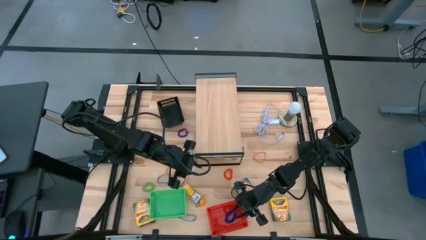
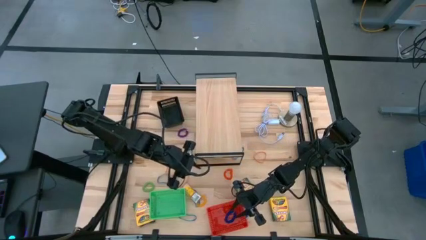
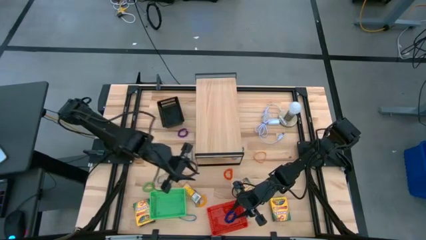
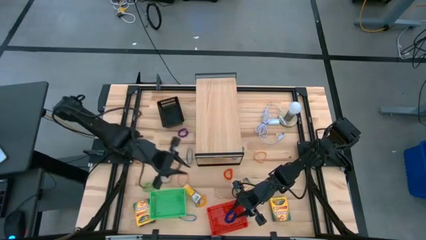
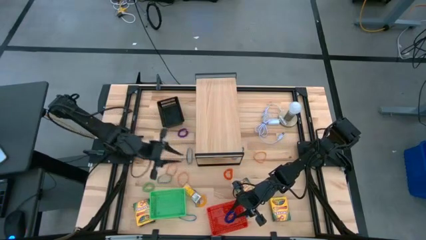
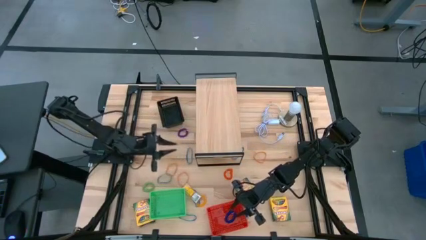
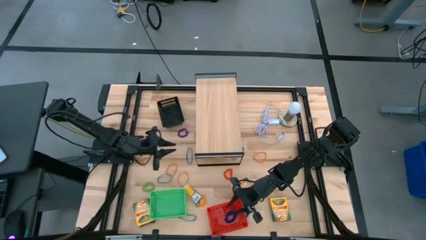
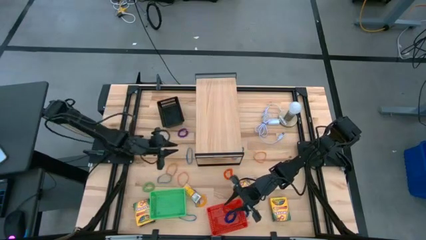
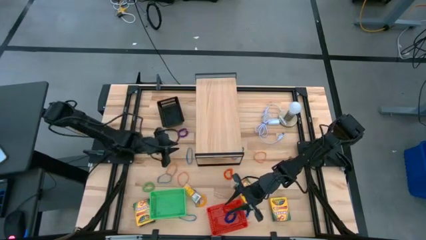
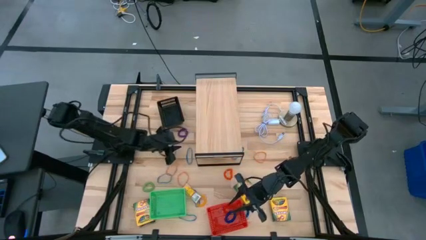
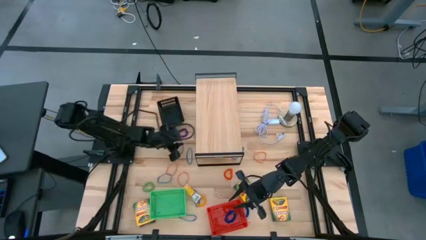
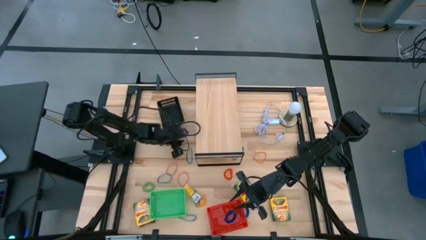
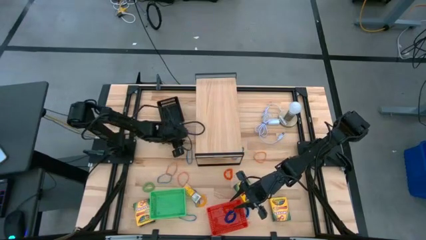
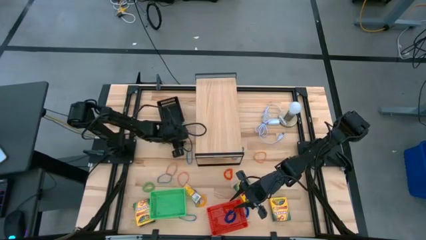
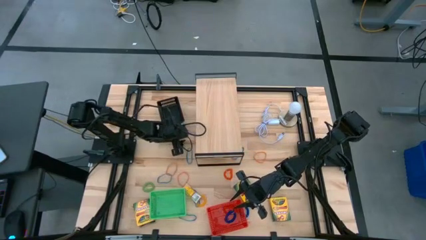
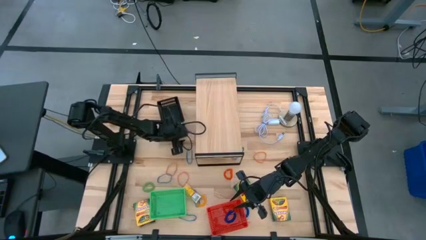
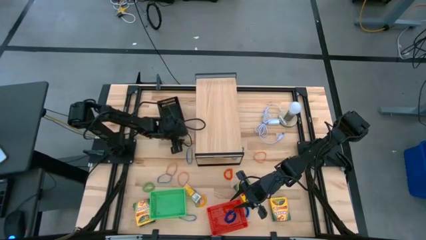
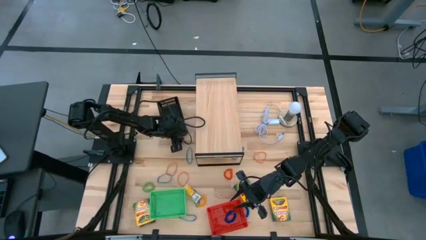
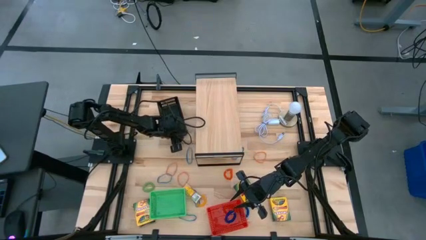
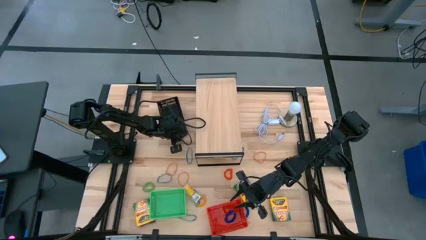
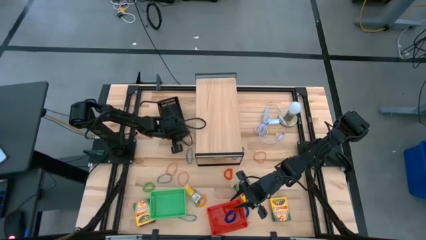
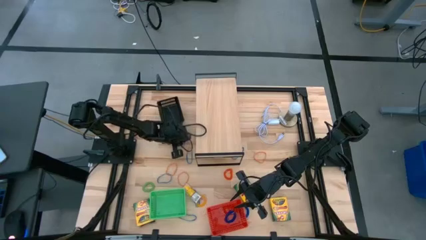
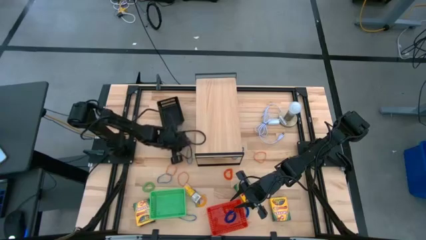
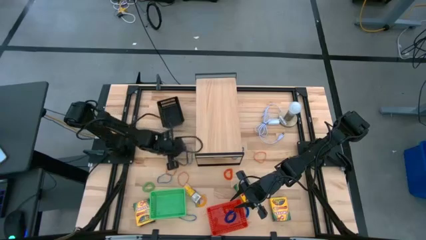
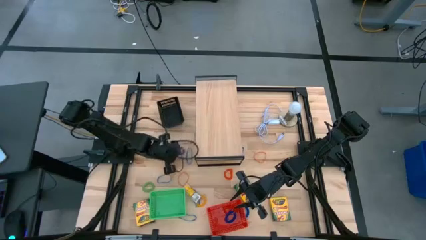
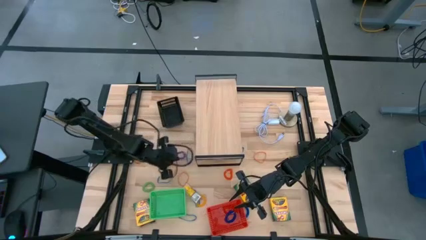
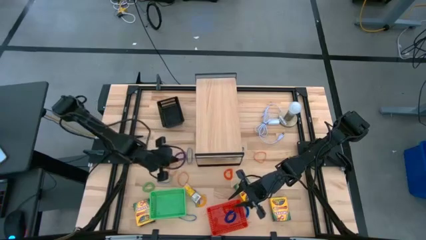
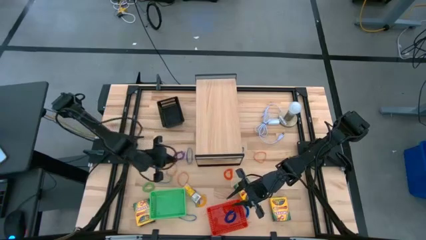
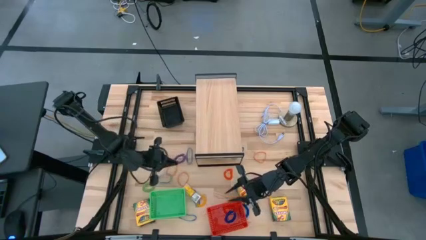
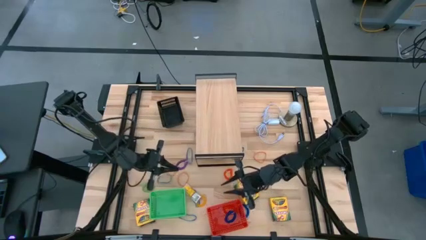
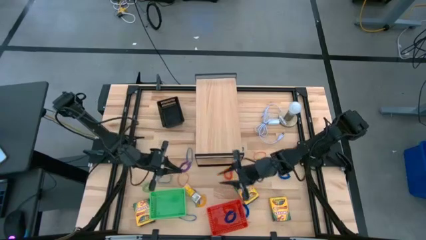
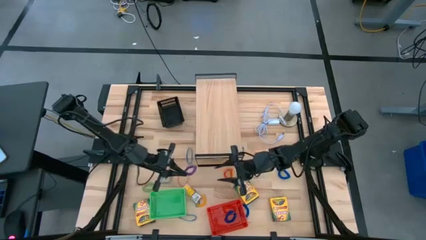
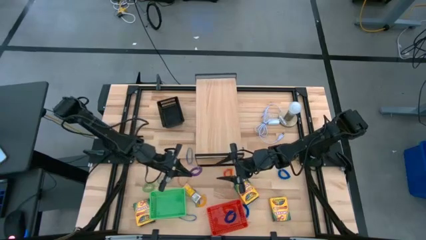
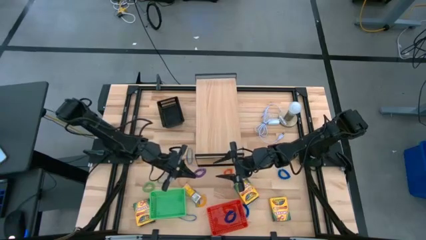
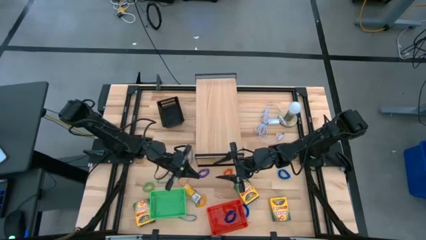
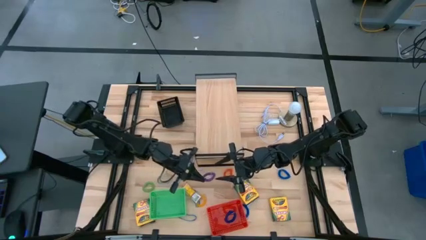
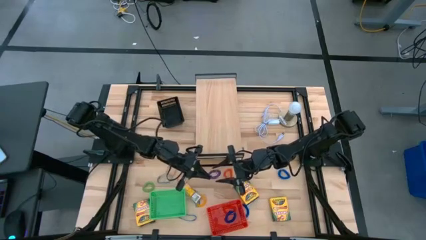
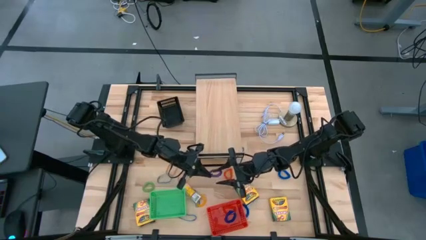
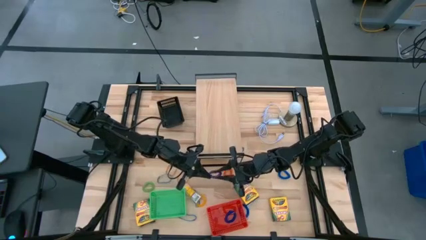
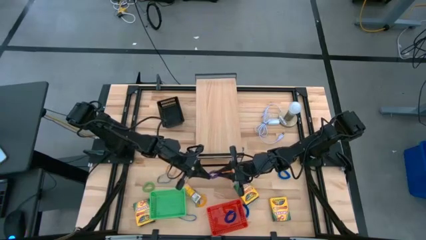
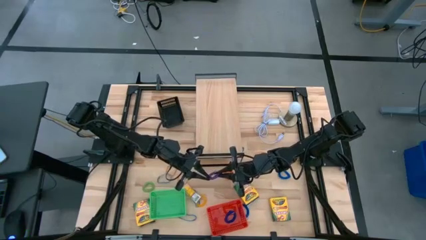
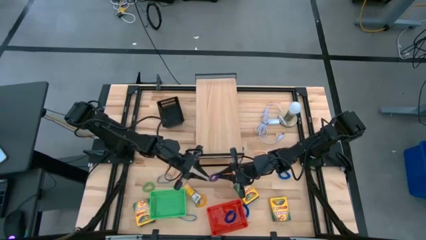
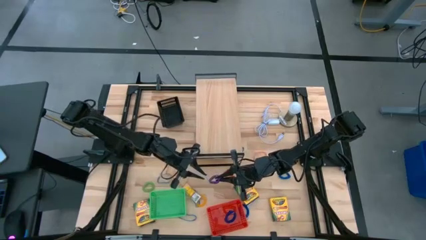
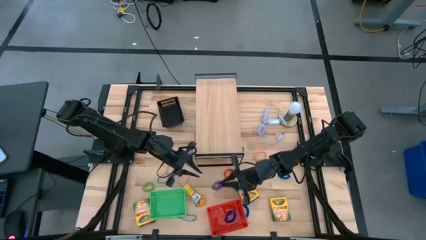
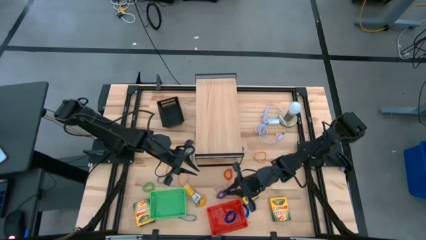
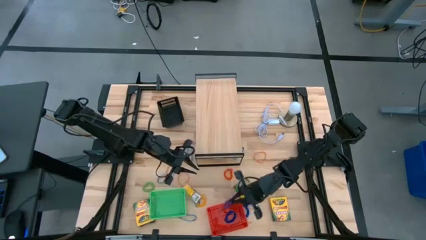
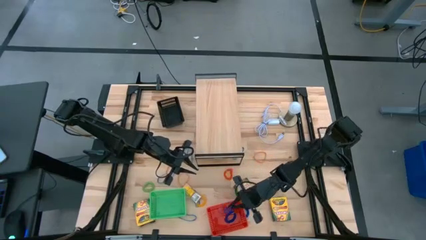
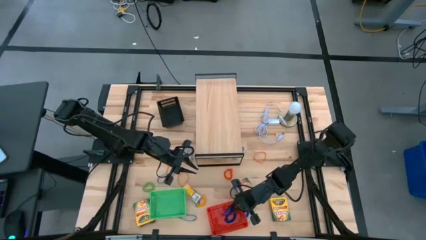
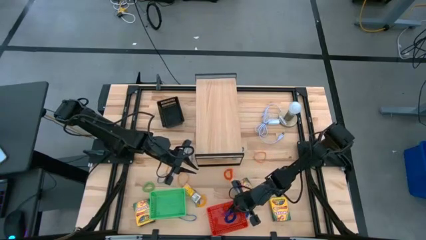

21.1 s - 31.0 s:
Task: Pick & Place Office Desk Supplies
Put the violet spring keychain into the red basket

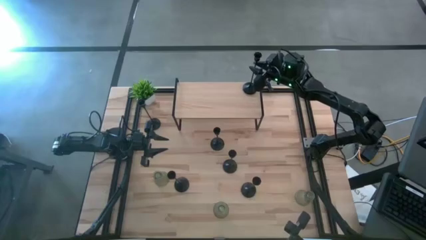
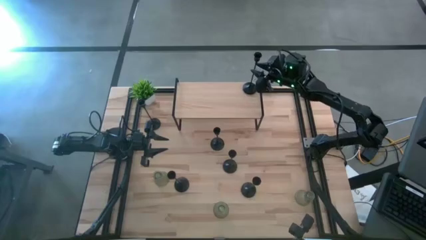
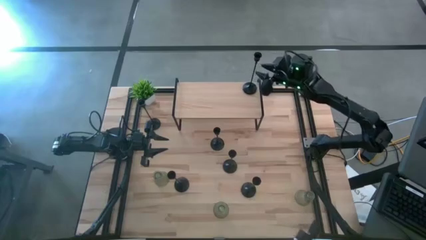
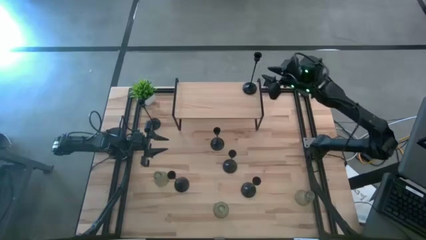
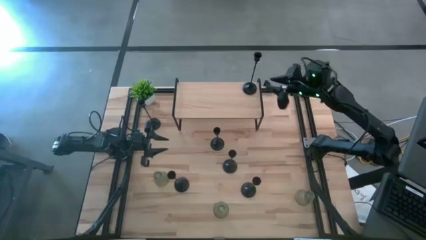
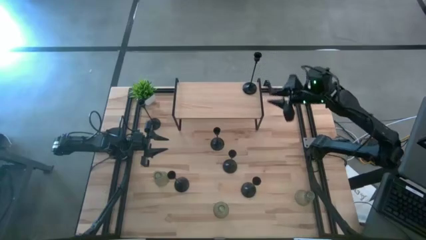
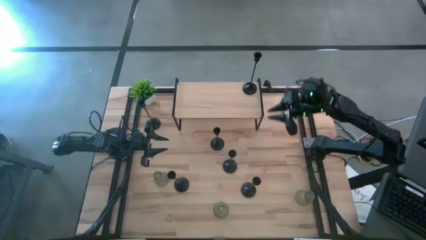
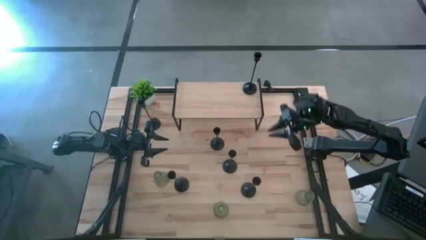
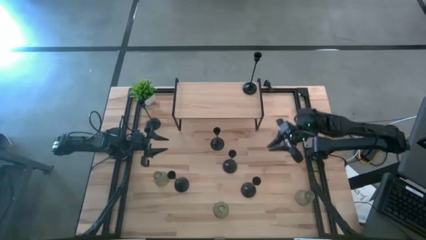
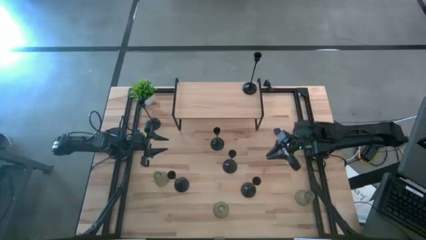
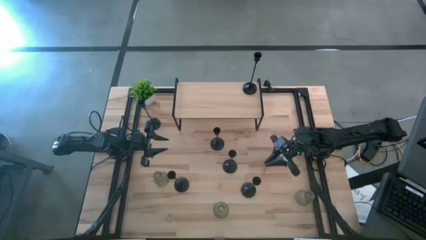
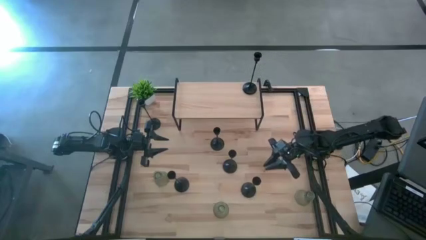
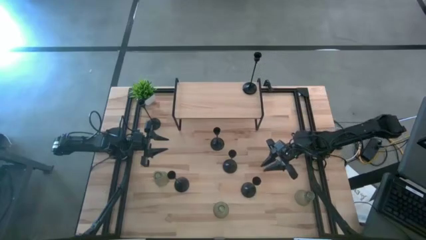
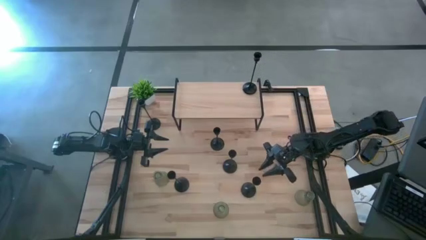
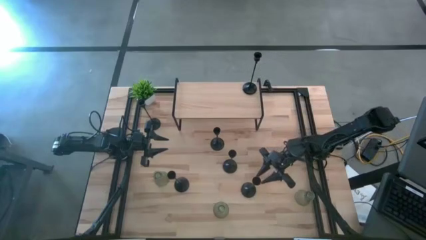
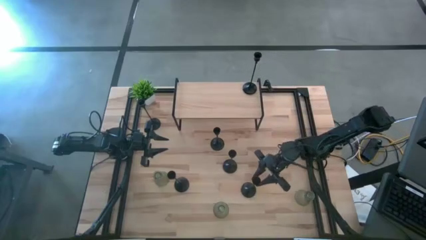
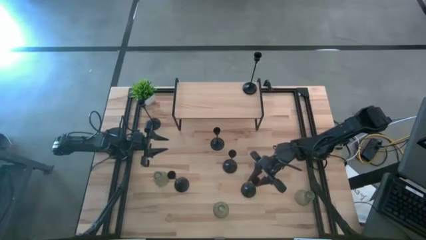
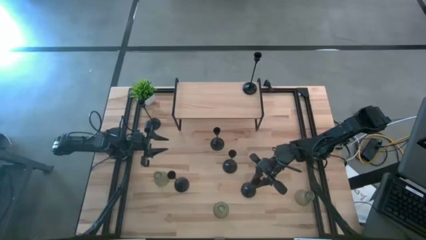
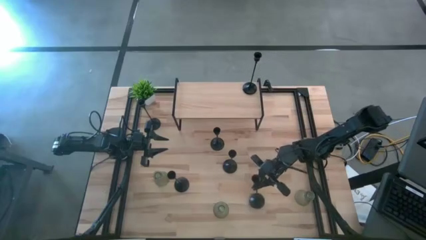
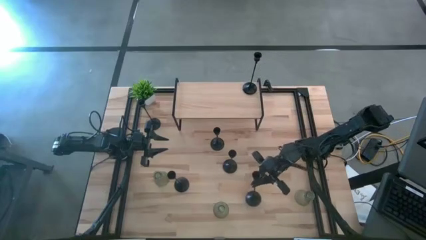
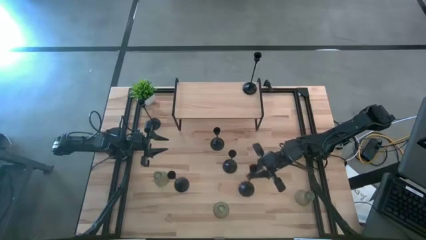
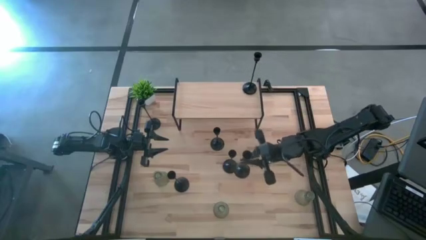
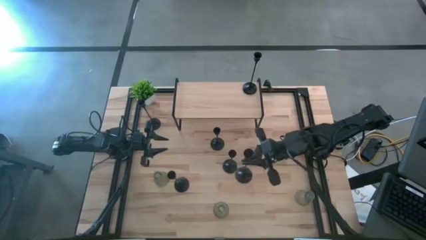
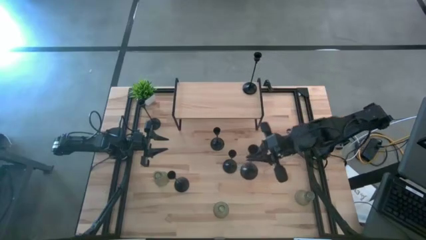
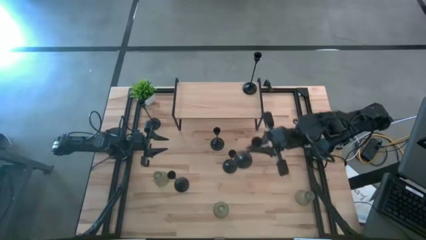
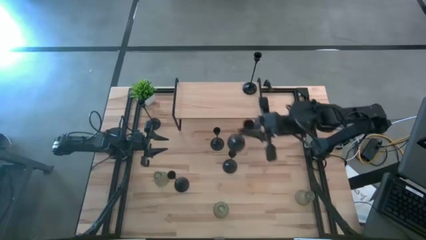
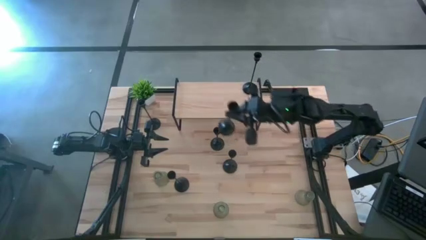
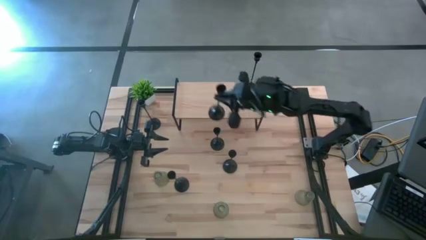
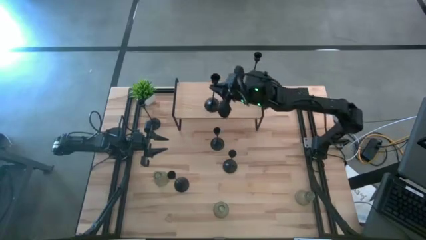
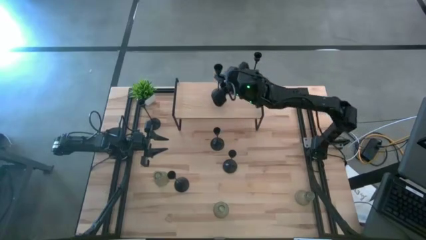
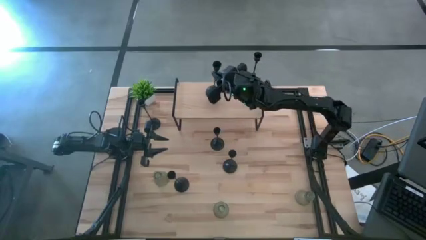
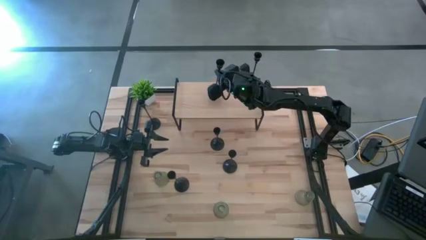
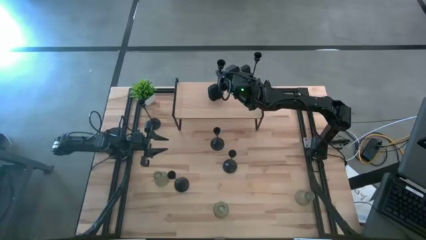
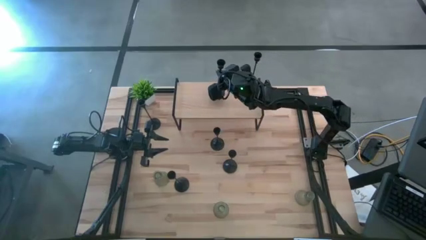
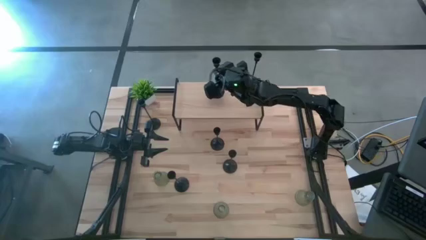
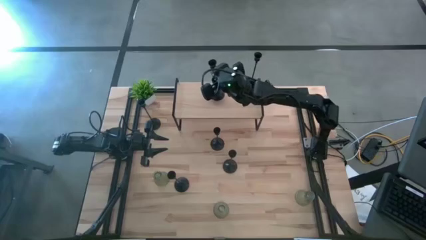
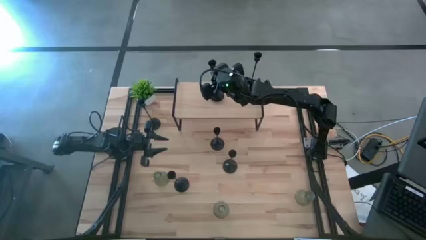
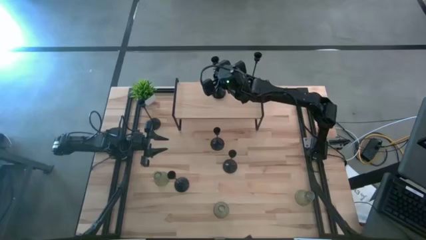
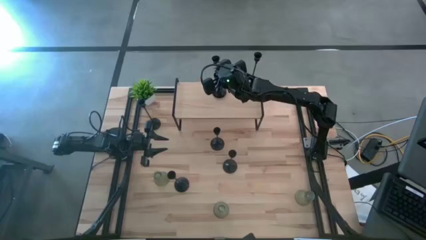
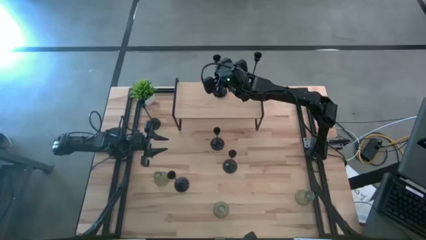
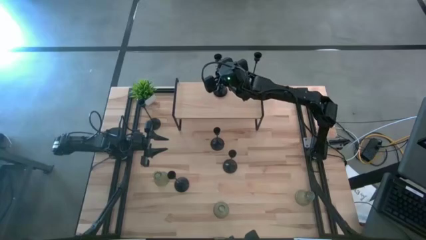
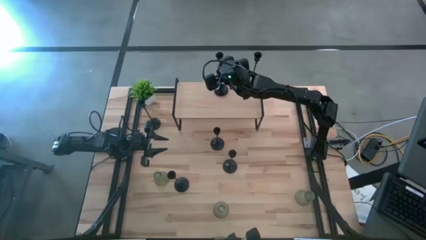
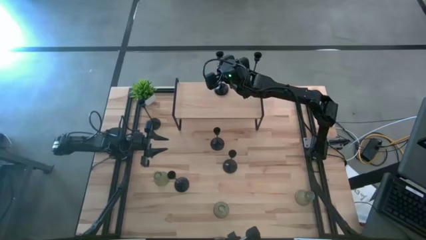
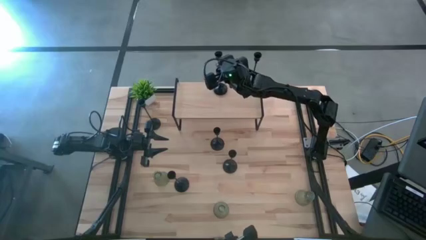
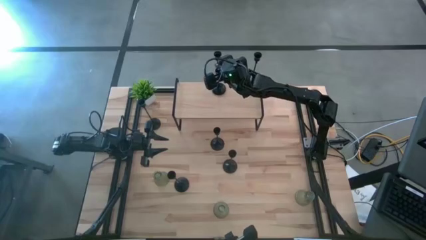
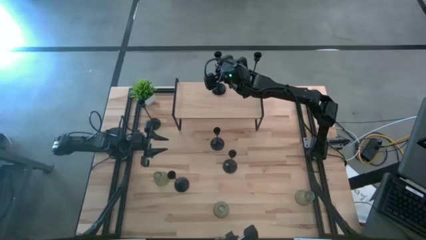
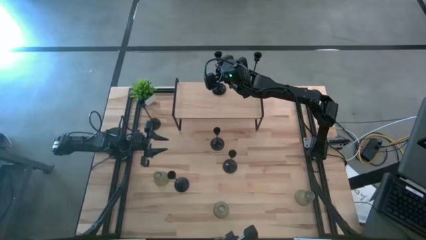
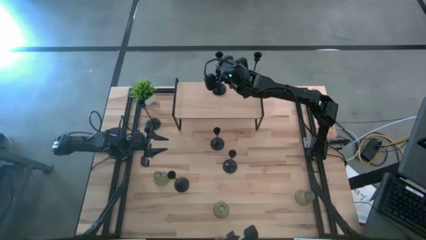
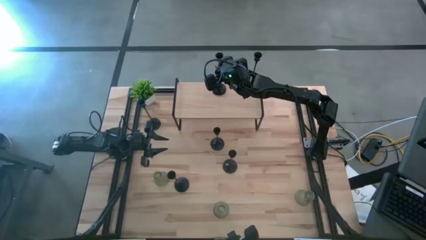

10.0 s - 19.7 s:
Task: Pick & Place candle stick holders
Put the black candle holder on the shelf
